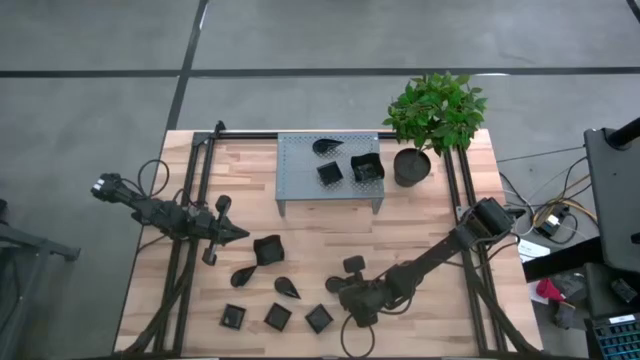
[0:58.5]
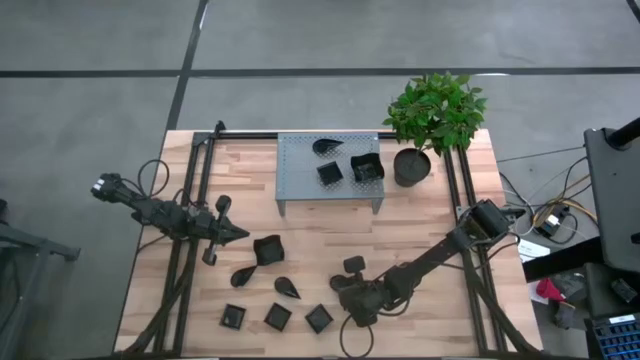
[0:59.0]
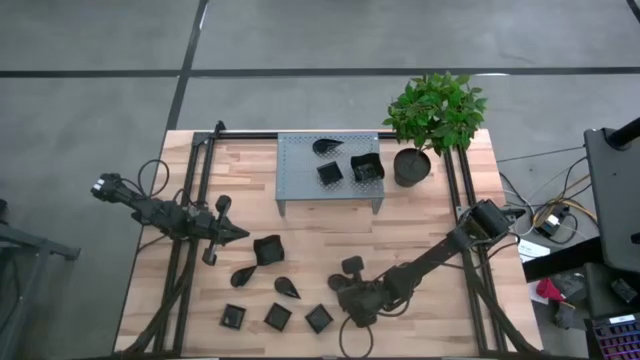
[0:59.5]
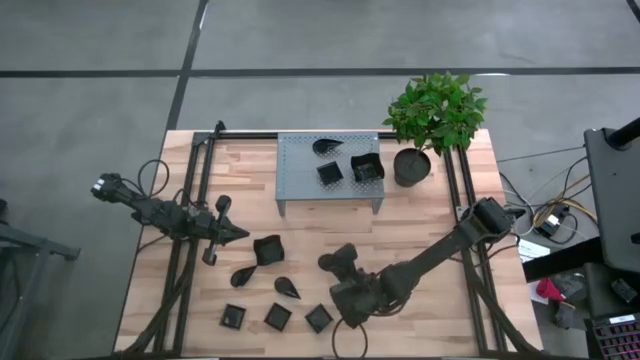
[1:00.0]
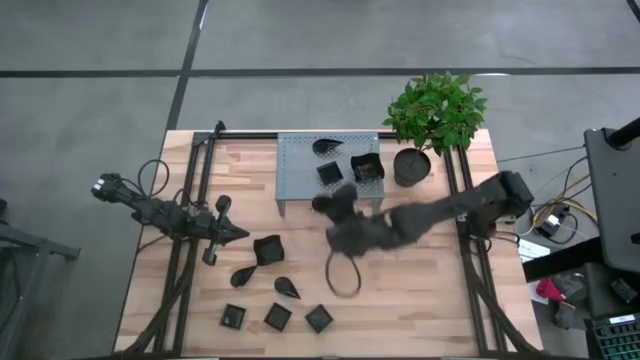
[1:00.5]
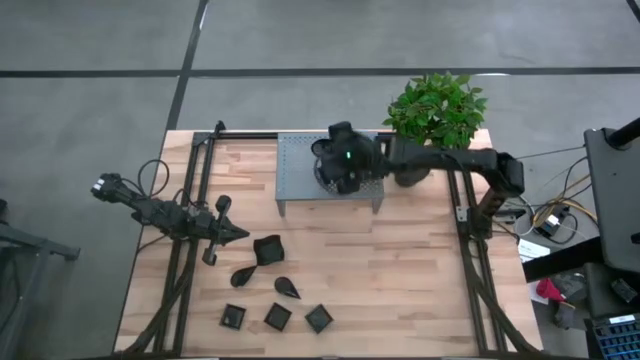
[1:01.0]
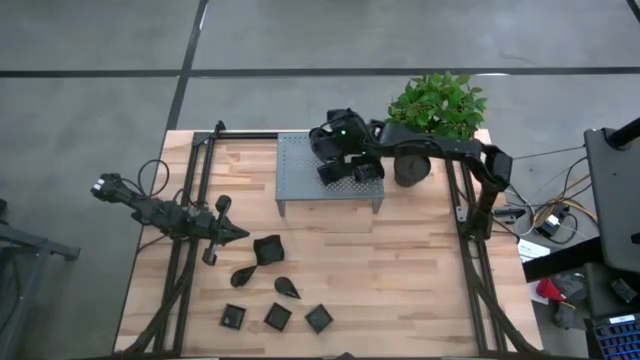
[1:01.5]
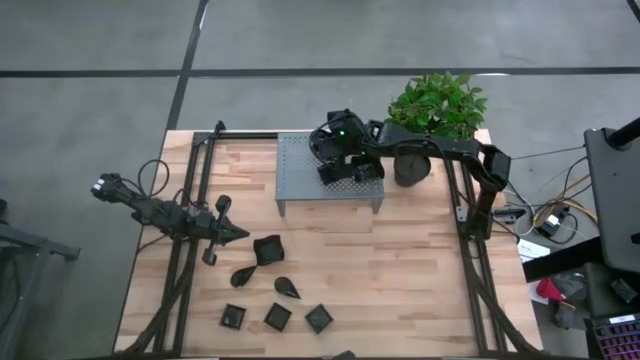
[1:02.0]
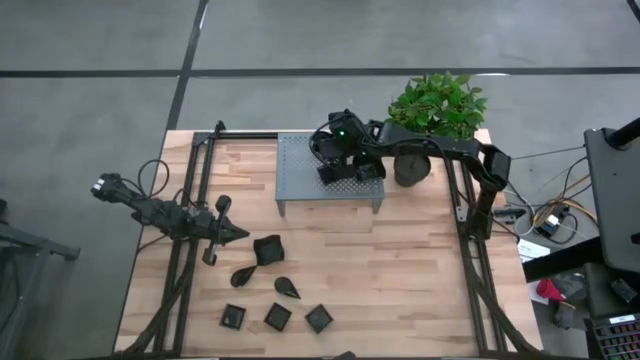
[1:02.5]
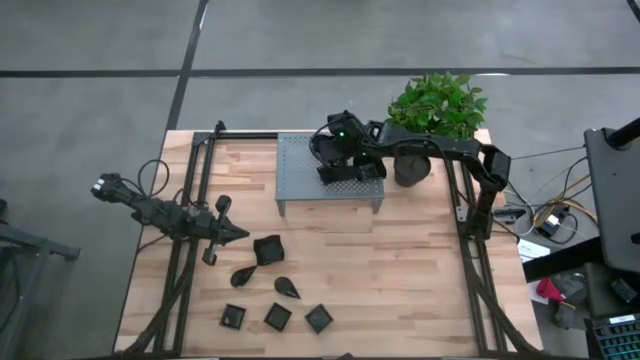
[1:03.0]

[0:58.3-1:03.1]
Task: Pick & Place Mini shaped plates
Stack the black drop-shaped plate on top of the black drop-shaped plate on the shelf

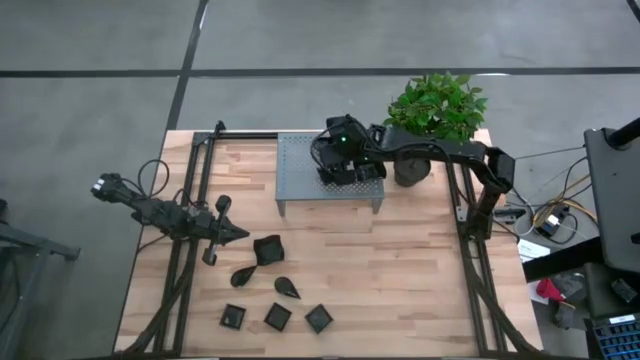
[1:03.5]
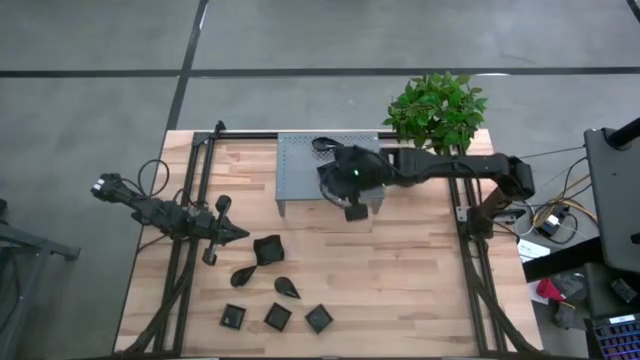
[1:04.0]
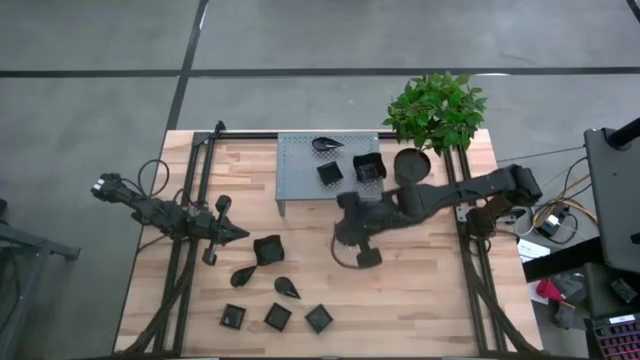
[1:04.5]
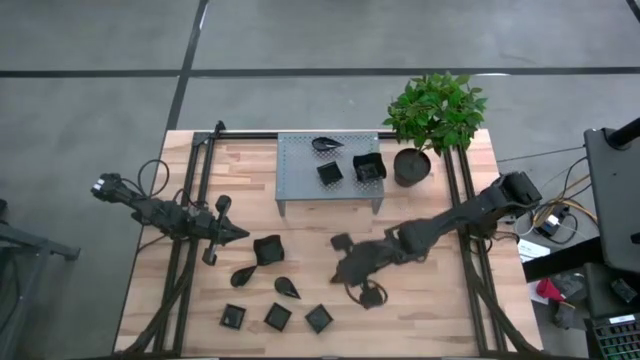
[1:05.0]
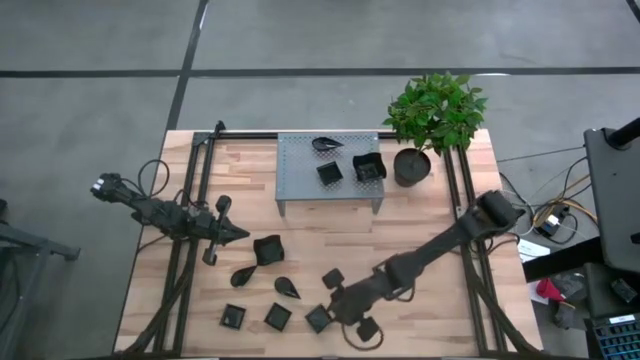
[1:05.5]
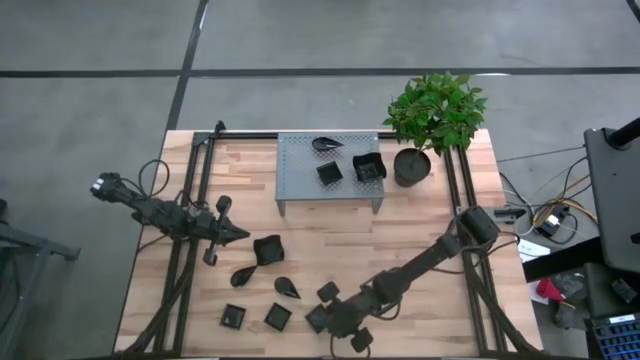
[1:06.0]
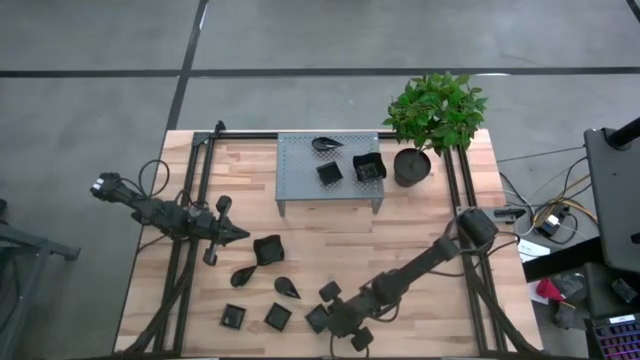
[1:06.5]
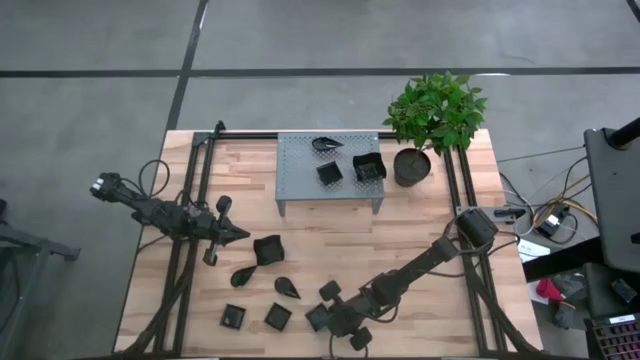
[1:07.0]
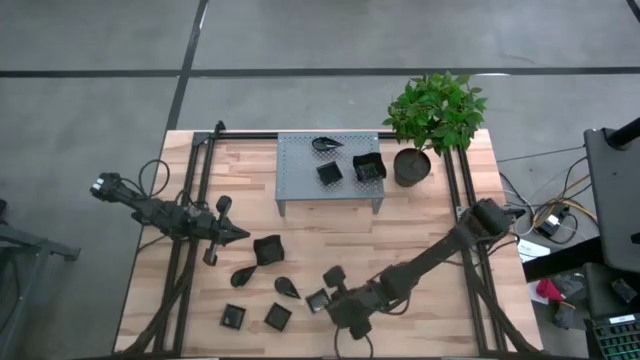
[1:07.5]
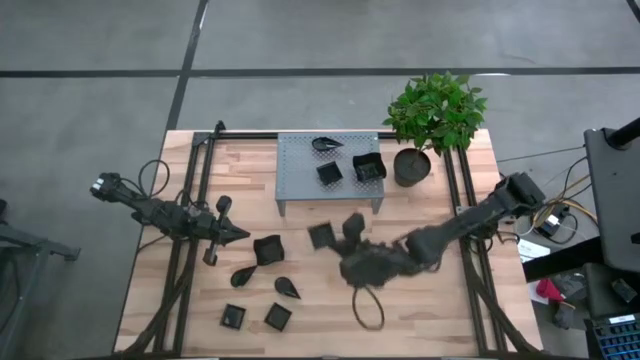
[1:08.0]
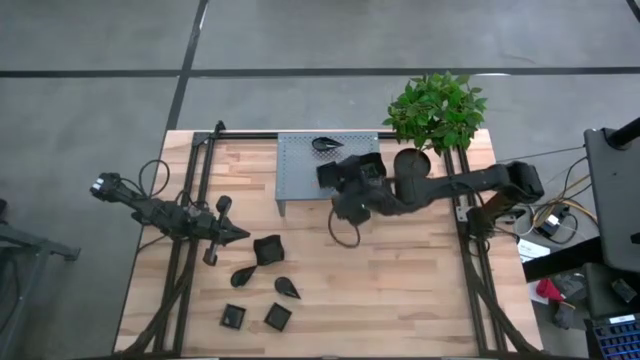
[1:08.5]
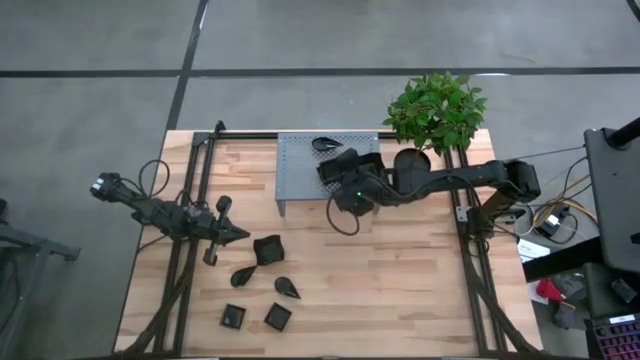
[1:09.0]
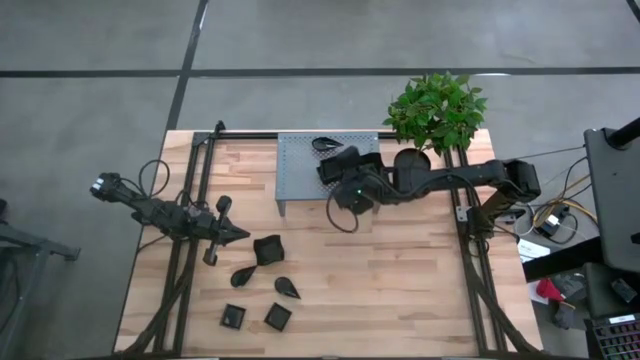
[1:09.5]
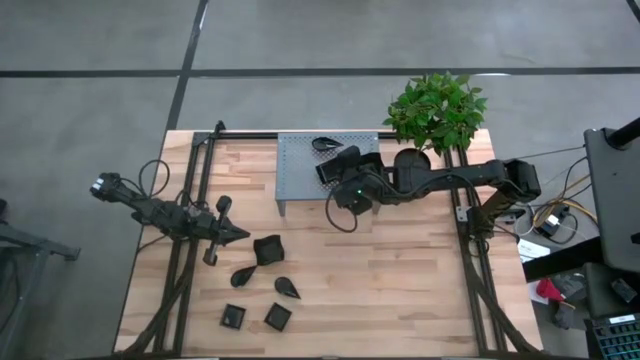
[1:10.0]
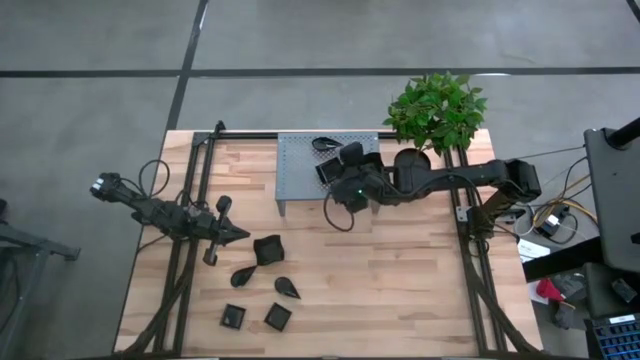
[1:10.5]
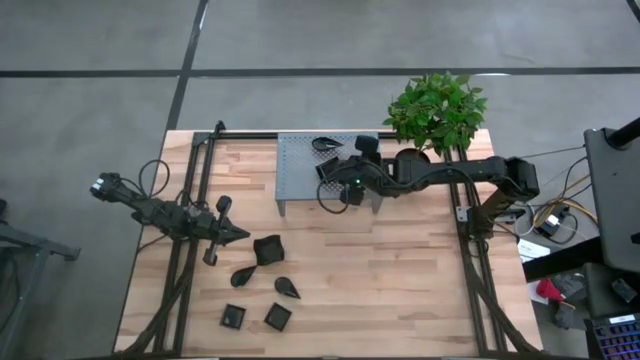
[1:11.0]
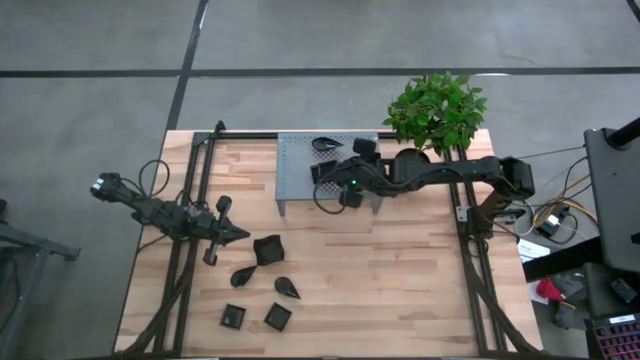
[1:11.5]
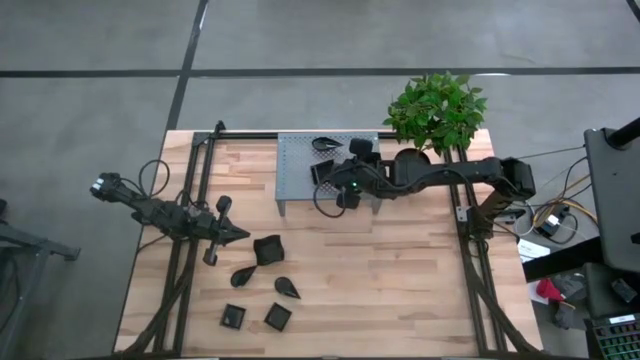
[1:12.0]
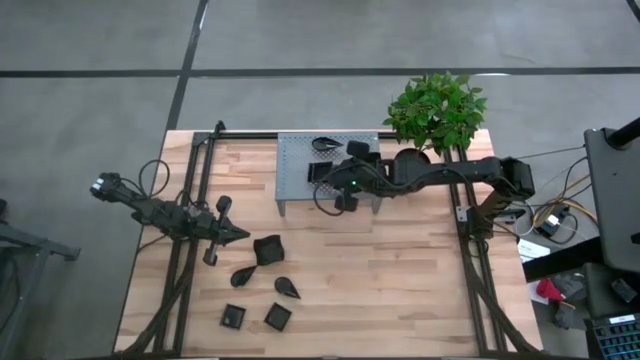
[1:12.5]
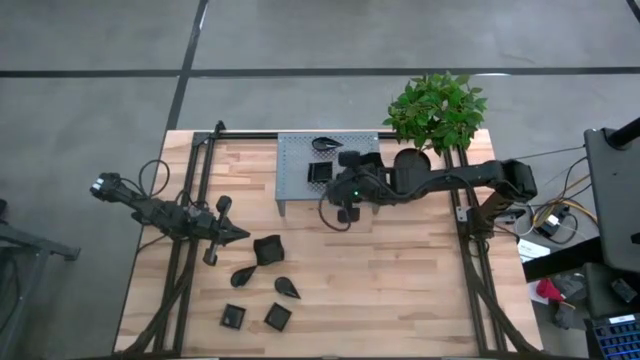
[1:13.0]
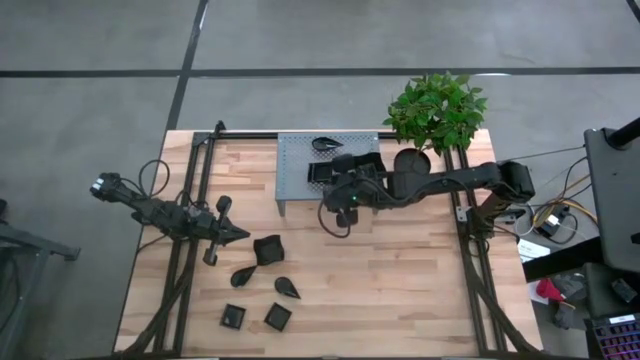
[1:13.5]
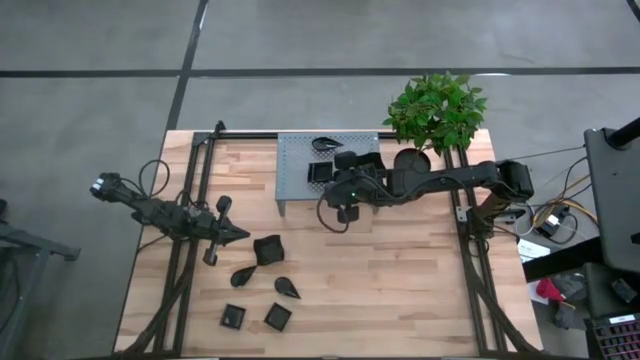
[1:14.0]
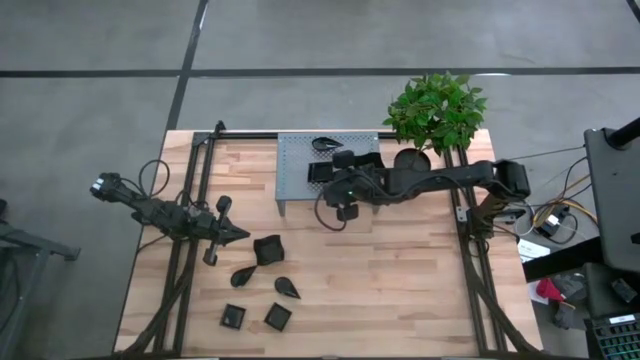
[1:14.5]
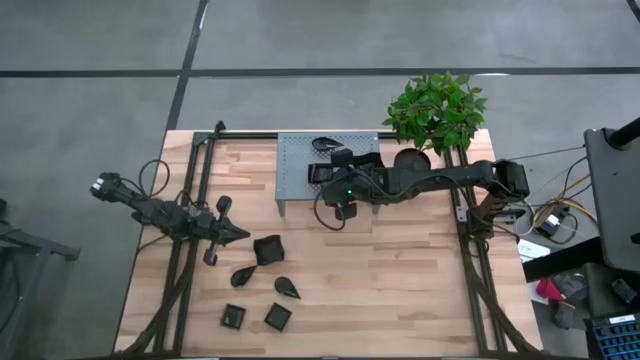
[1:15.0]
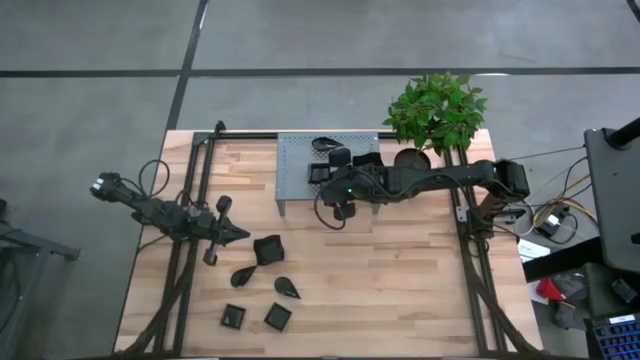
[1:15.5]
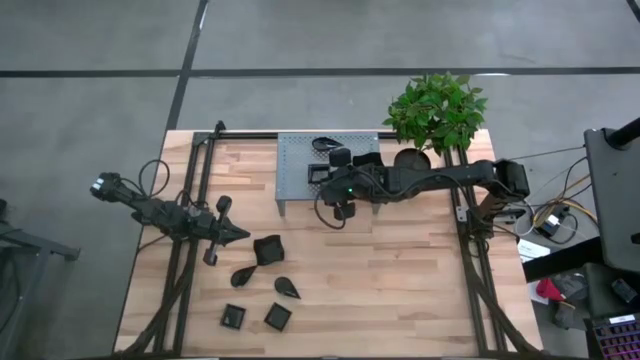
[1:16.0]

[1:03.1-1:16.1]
Stack the black square plate on top of the black square plates on the shelf
